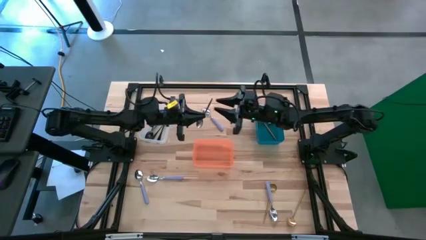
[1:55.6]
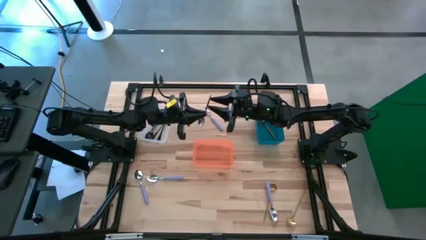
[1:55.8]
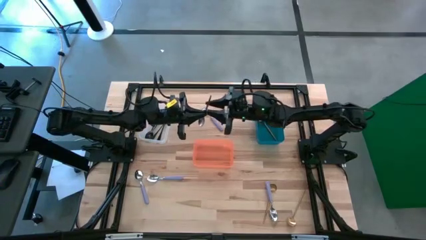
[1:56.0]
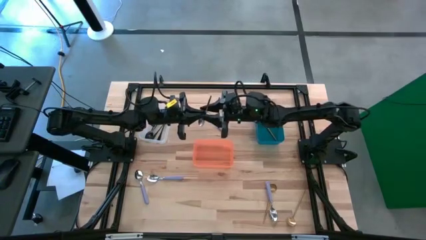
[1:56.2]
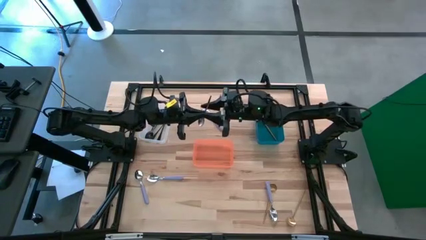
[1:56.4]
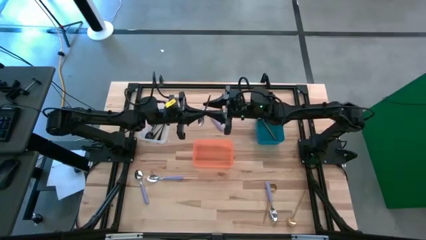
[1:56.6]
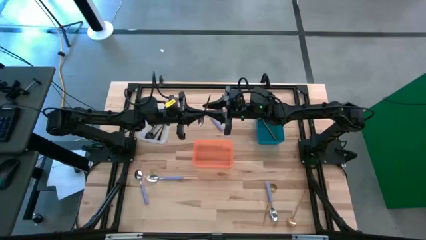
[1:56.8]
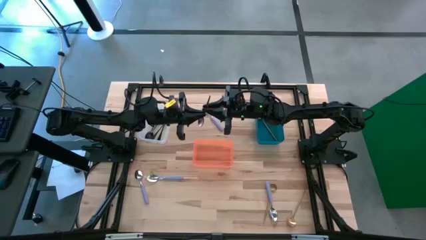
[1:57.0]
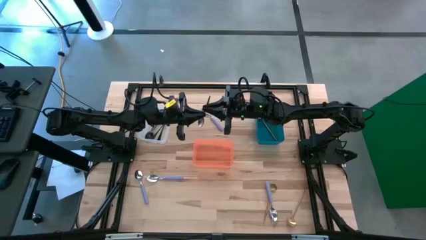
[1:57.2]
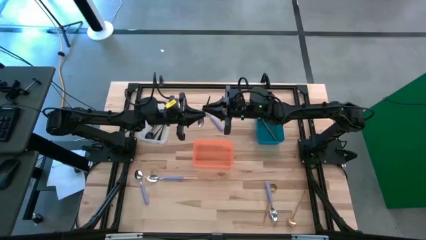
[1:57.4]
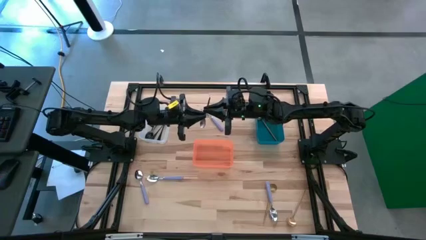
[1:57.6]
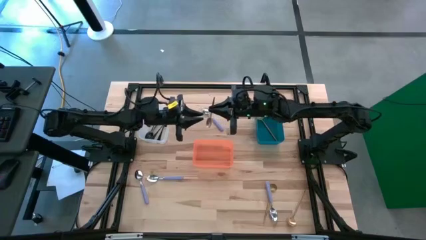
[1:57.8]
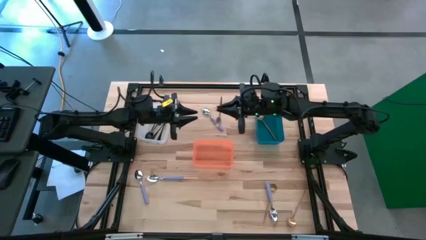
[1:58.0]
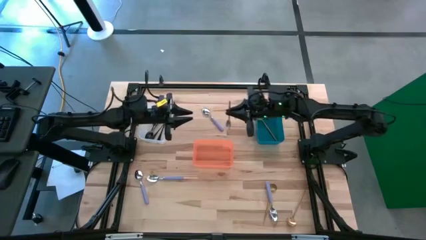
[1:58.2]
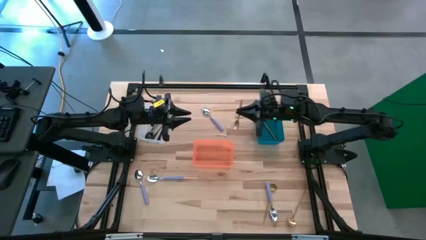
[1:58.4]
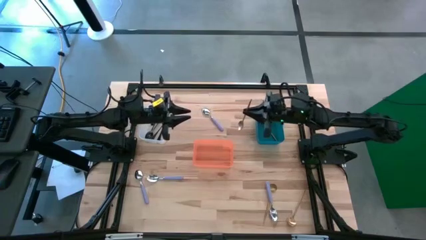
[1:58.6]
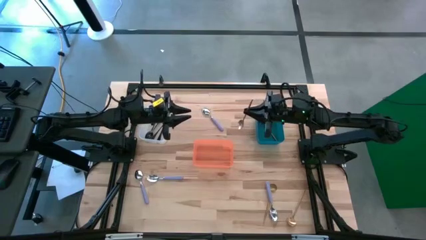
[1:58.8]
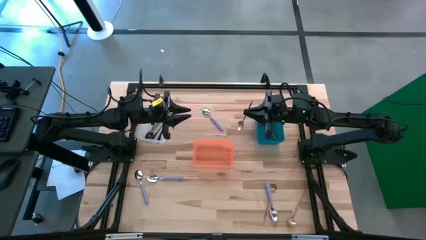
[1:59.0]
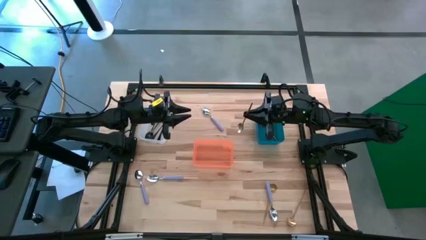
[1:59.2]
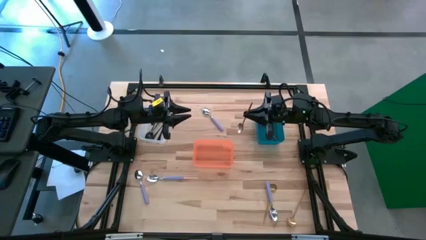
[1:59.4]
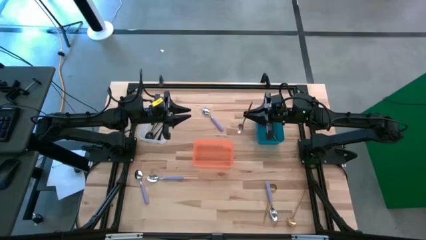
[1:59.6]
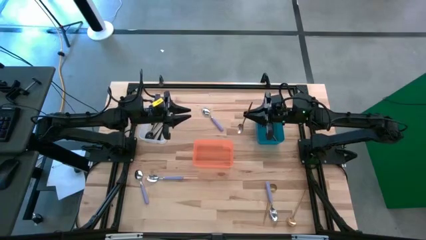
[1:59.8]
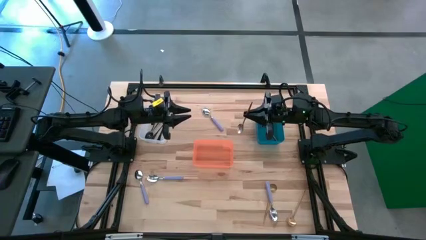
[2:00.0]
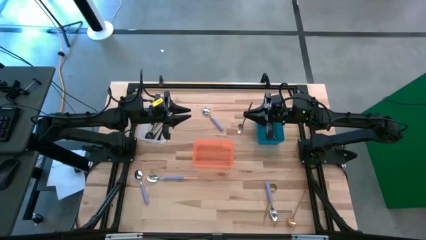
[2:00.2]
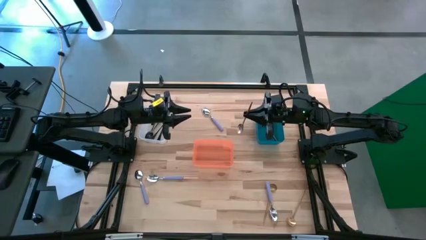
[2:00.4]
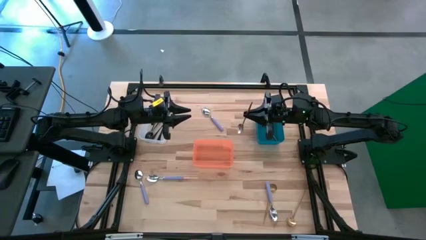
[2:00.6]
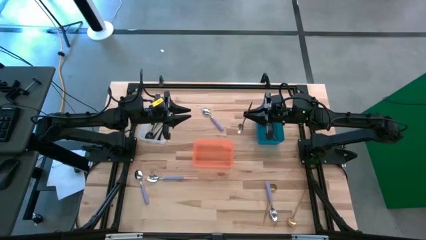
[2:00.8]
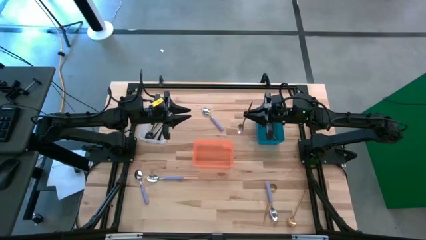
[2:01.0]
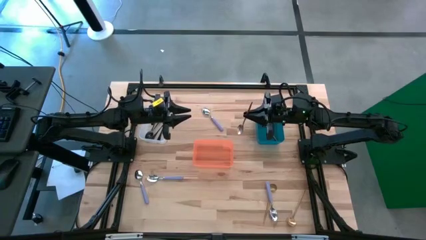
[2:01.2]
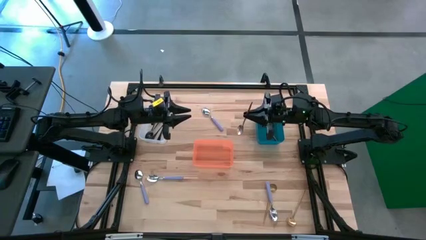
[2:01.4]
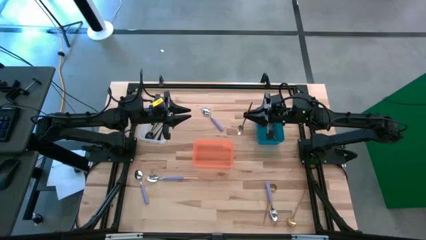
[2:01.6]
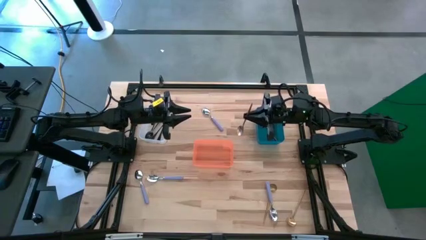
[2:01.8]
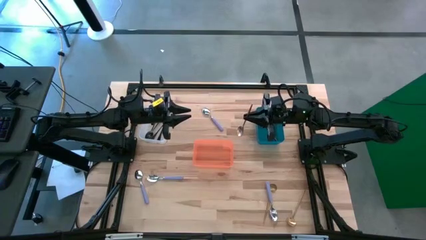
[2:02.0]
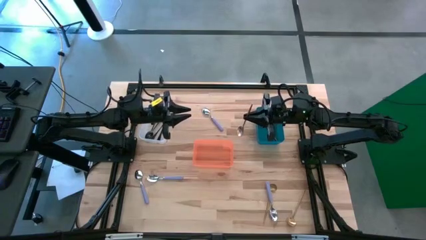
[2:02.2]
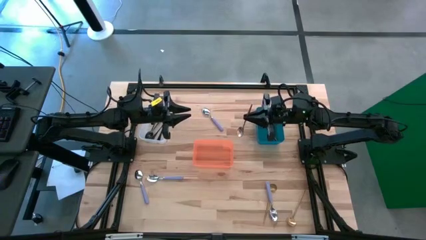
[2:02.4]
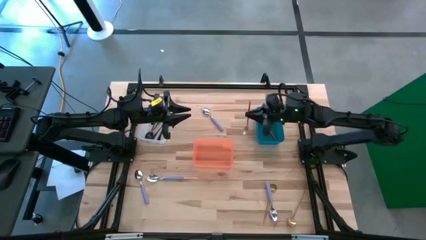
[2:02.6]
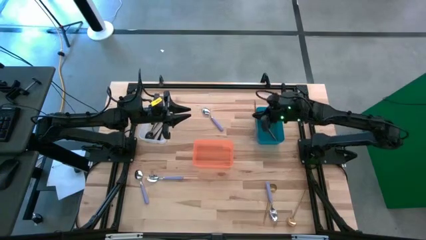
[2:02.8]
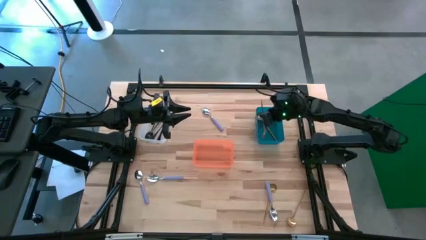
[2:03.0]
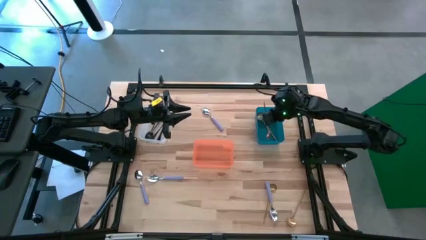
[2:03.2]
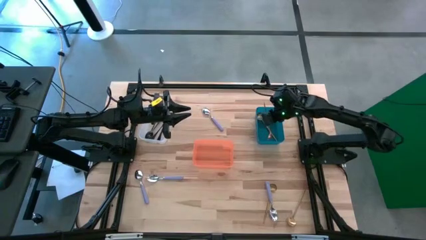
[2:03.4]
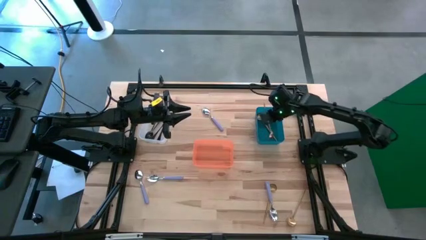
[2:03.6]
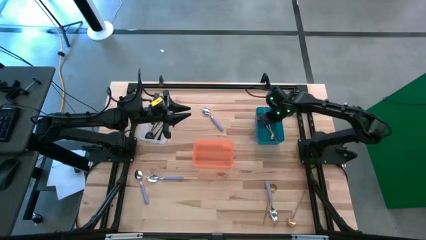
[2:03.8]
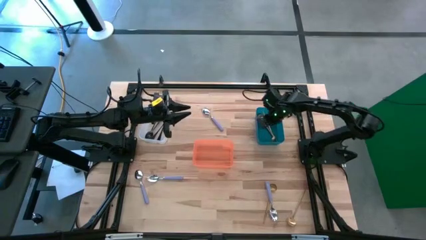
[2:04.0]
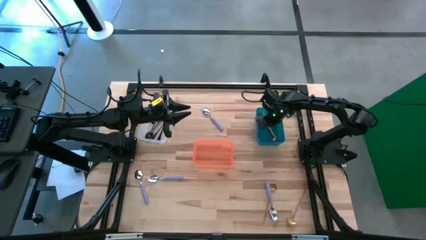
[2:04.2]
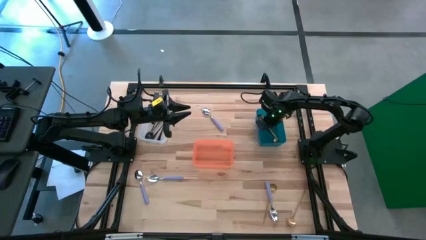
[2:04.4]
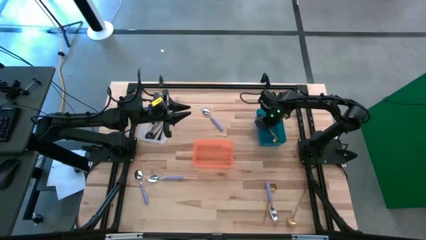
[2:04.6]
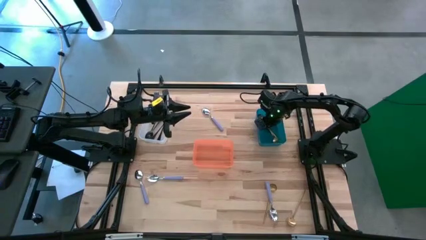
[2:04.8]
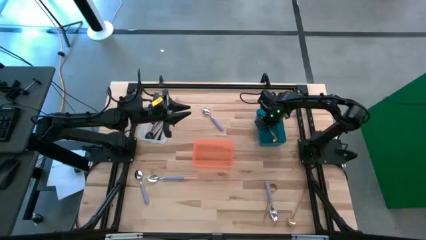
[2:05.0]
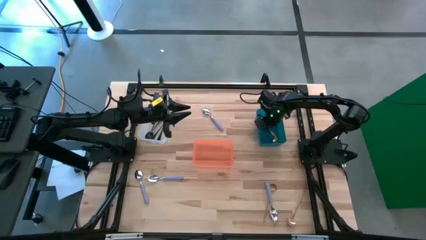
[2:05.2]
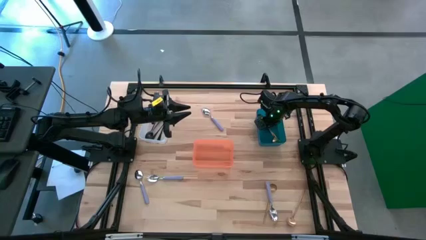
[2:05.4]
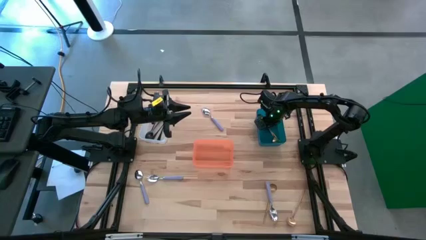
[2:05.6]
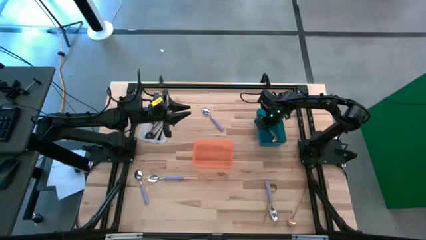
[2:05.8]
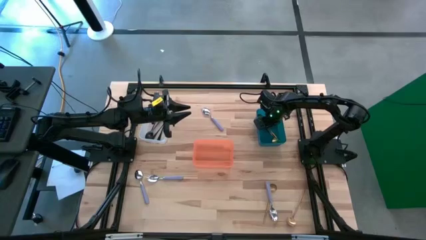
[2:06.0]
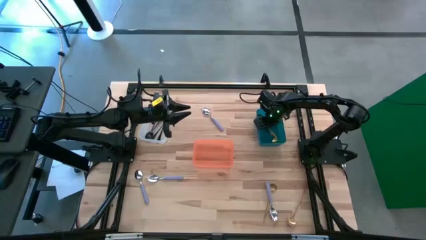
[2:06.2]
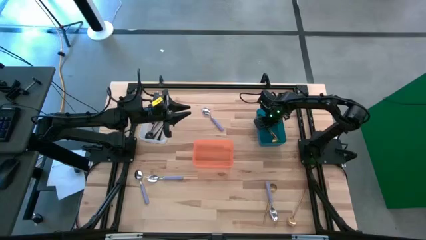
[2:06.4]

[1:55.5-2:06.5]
Task: Sort silverware by color (type)
Put the left gold spoon into the blue bin

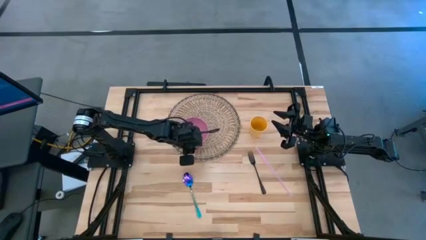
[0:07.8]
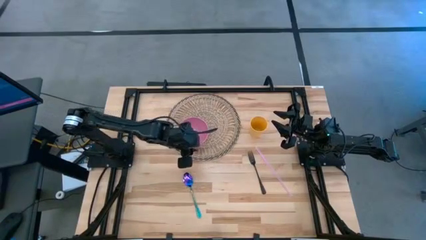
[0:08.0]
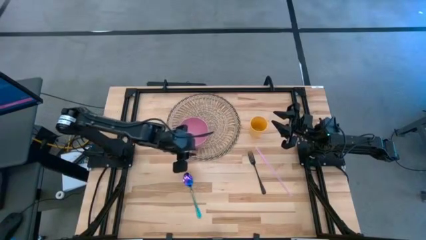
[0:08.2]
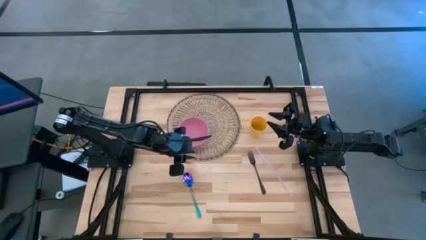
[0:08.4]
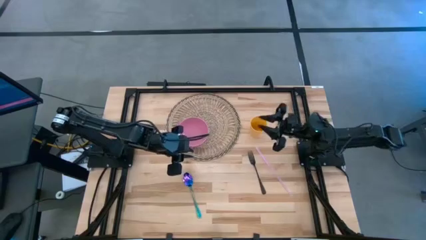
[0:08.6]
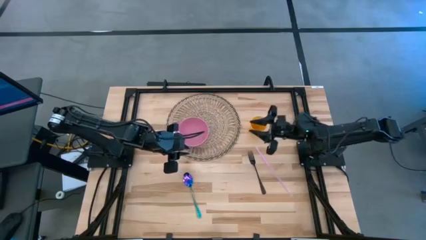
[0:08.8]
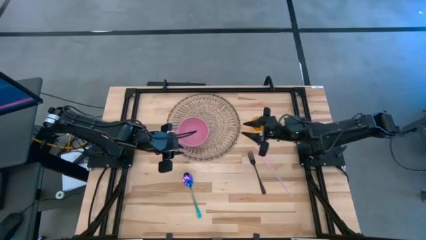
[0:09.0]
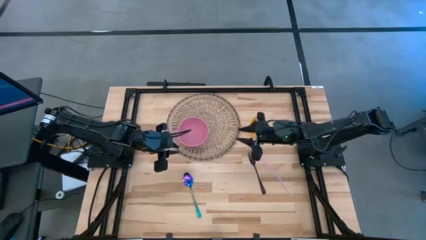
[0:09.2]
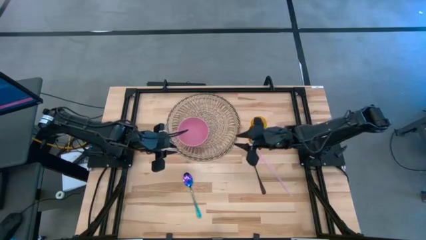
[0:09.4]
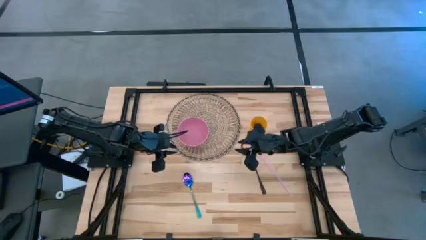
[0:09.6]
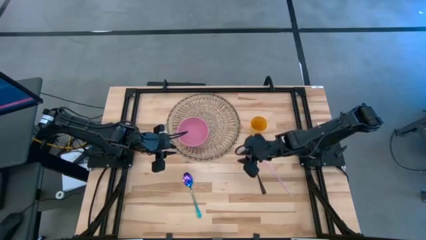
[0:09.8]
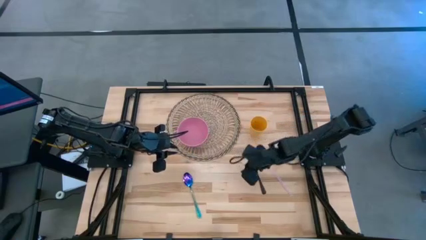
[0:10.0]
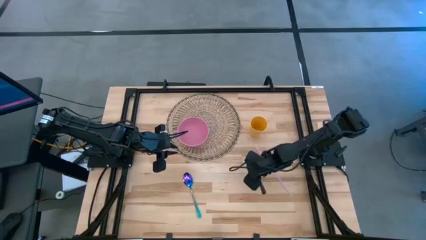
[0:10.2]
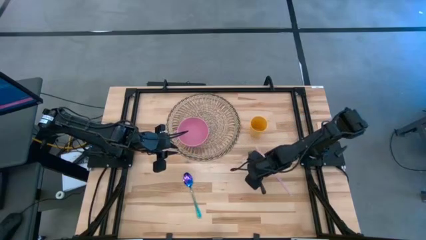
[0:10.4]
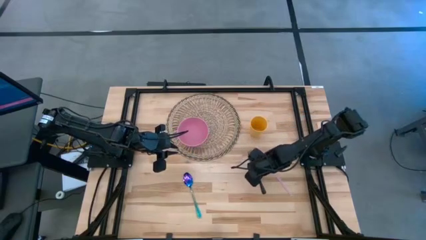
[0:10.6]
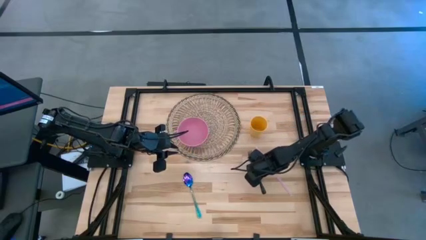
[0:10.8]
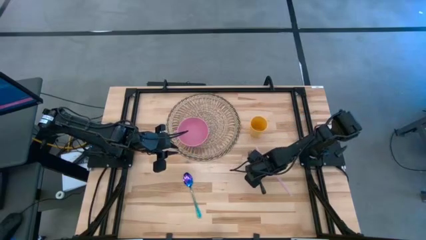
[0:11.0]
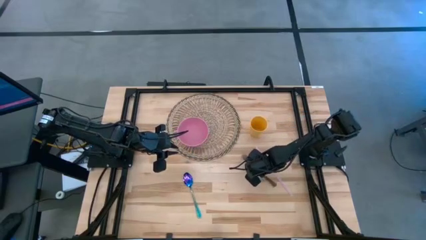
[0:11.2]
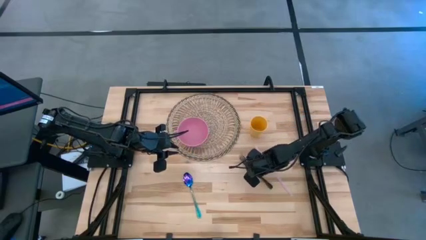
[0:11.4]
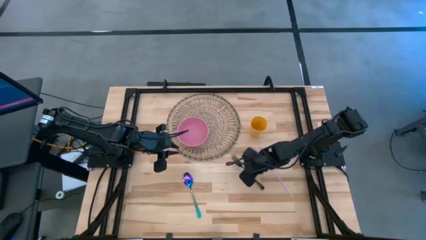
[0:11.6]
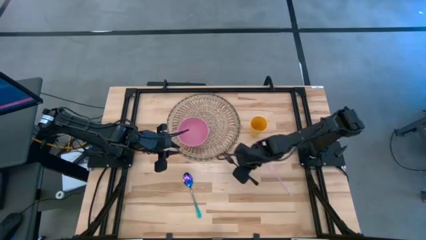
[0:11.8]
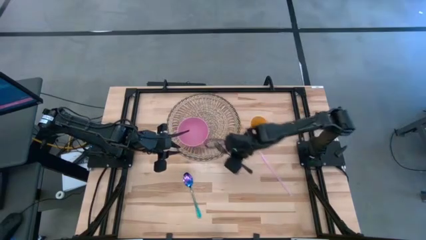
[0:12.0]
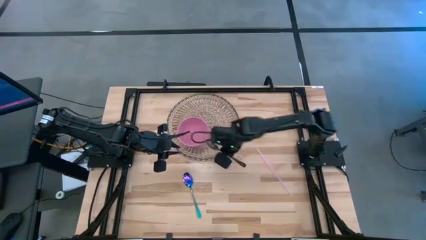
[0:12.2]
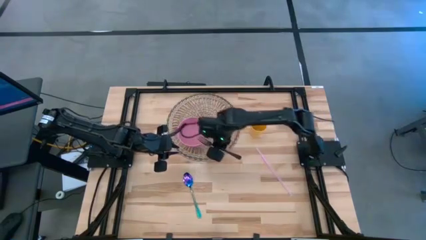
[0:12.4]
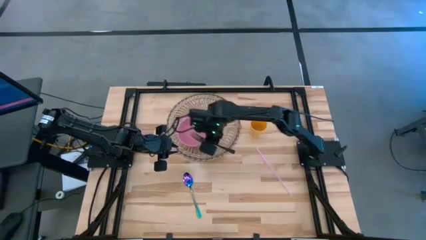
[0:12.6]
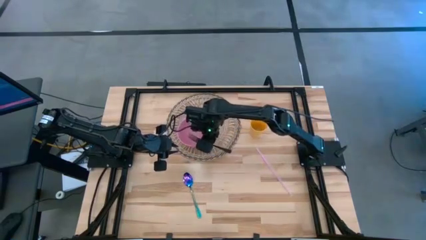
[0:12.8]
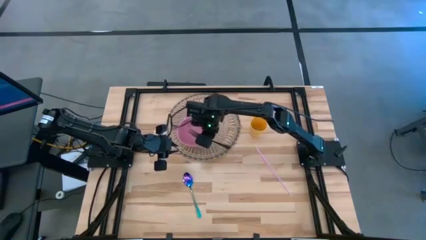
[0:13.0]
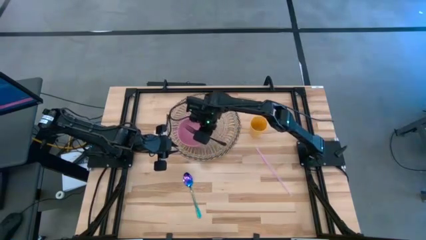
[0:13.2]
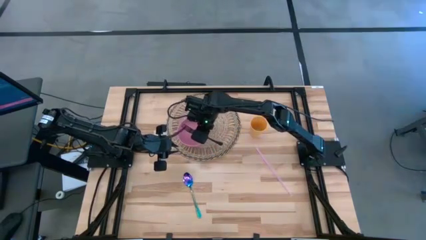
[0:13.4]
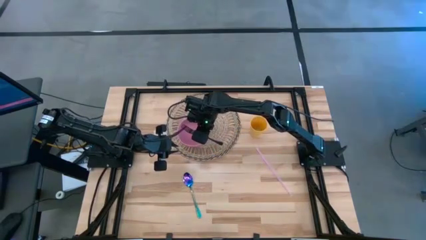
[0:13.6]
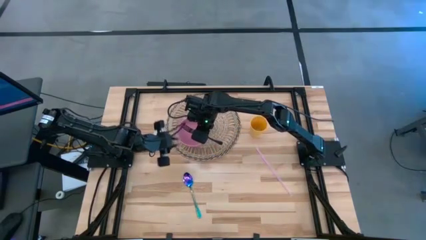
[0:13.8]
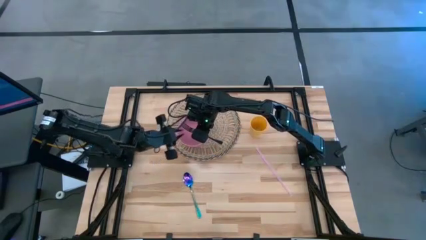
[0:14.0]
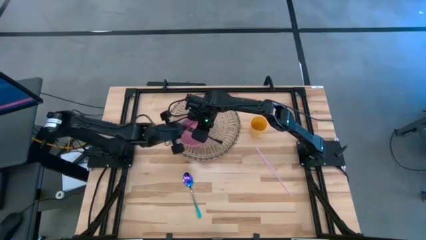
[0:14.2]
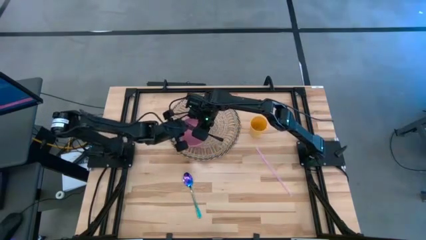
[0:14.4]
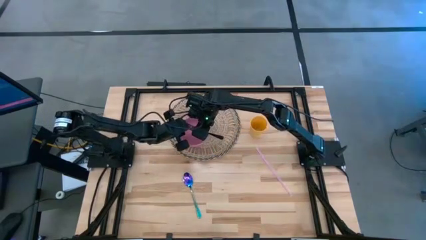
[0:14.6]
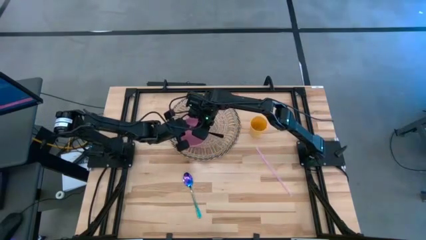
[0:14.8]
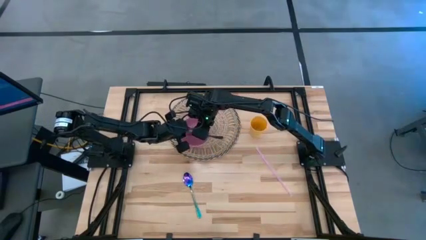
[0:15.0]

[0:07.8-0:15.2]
Task: Pick & Place Utensil
Put the black fork on the pink bowl
